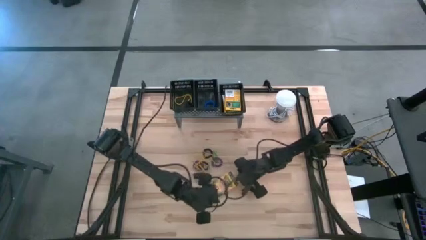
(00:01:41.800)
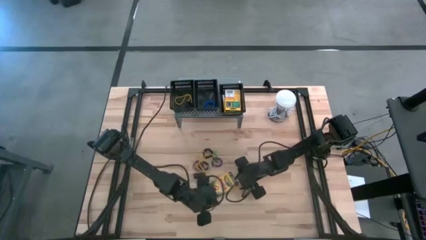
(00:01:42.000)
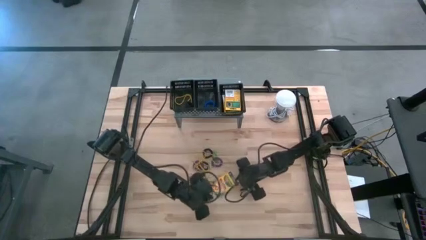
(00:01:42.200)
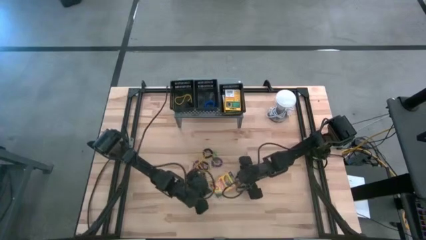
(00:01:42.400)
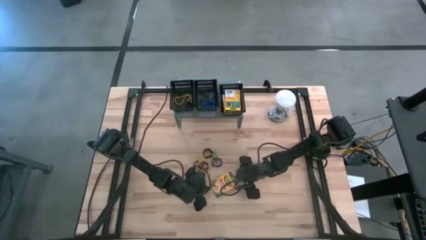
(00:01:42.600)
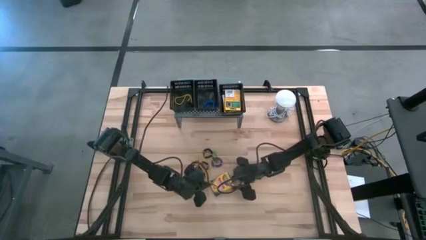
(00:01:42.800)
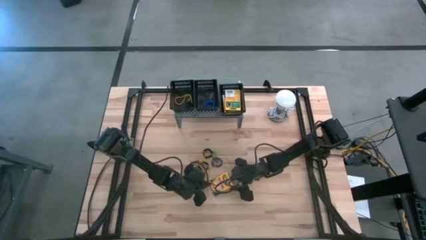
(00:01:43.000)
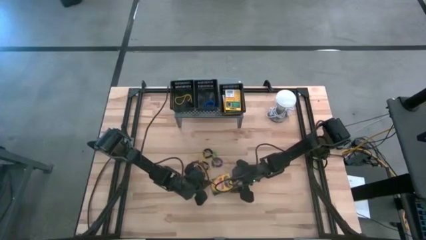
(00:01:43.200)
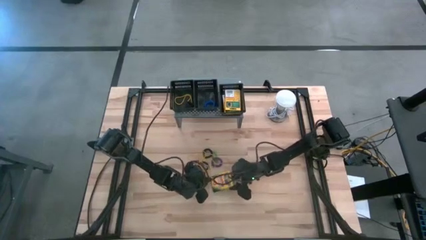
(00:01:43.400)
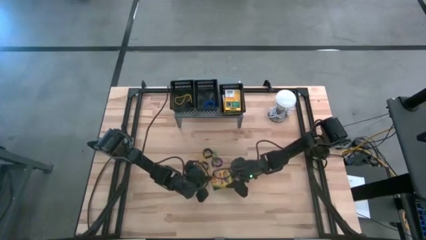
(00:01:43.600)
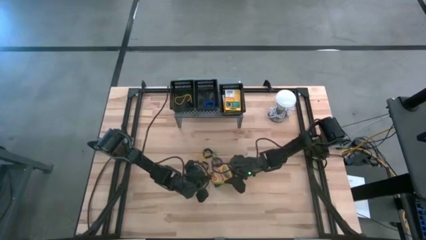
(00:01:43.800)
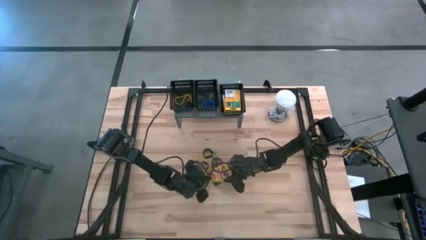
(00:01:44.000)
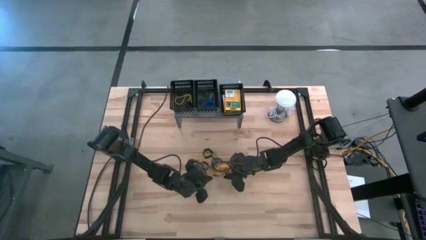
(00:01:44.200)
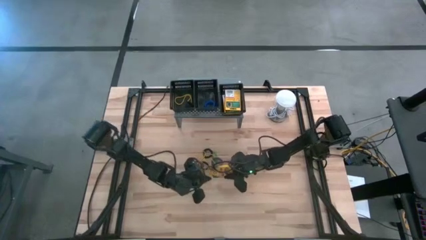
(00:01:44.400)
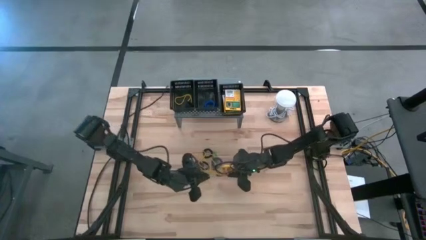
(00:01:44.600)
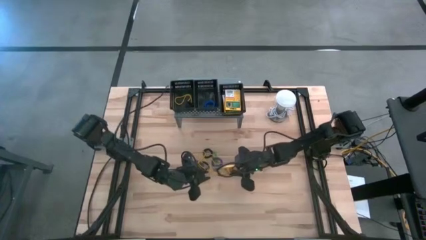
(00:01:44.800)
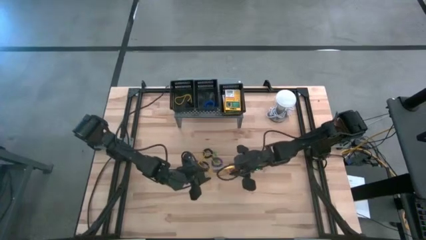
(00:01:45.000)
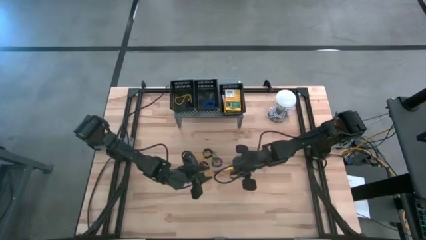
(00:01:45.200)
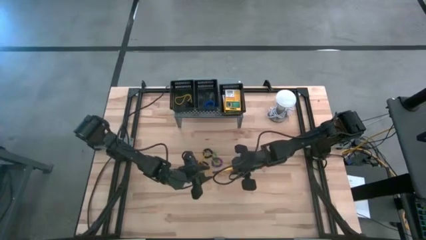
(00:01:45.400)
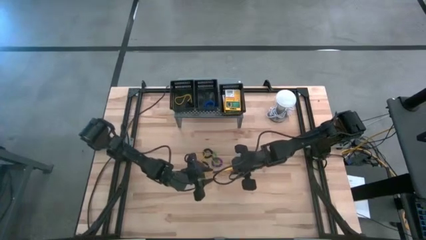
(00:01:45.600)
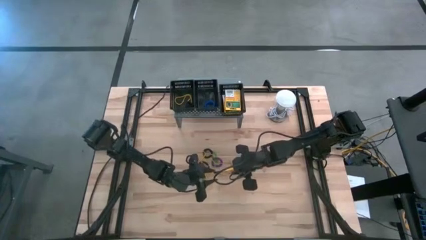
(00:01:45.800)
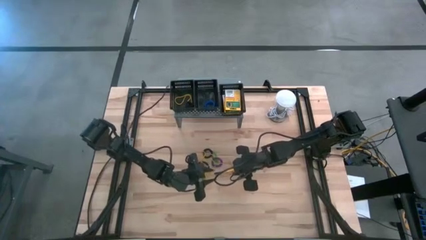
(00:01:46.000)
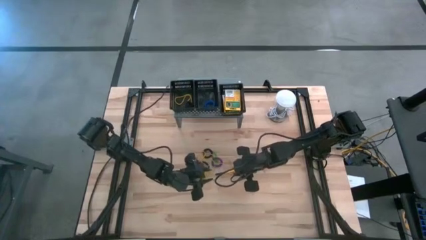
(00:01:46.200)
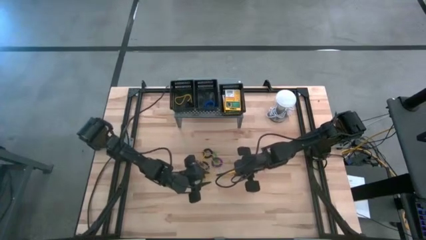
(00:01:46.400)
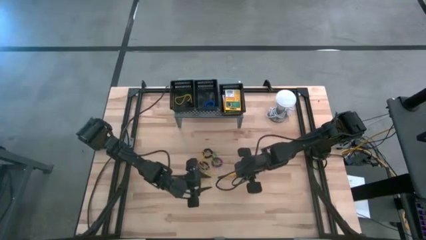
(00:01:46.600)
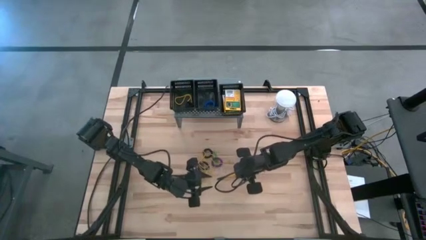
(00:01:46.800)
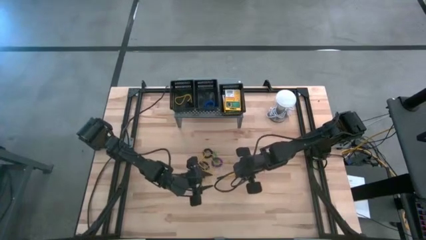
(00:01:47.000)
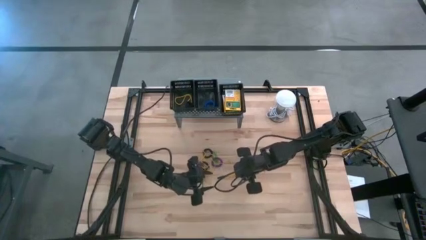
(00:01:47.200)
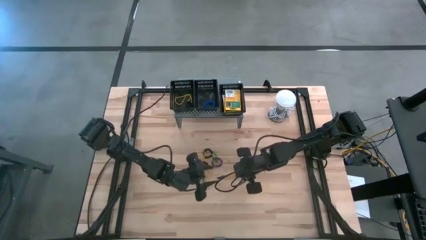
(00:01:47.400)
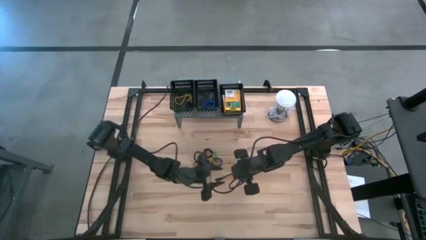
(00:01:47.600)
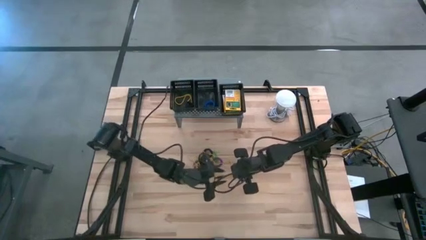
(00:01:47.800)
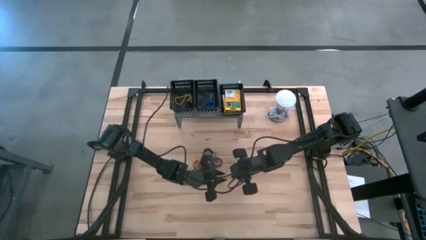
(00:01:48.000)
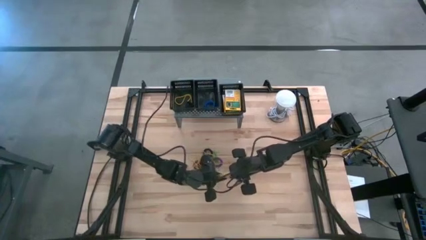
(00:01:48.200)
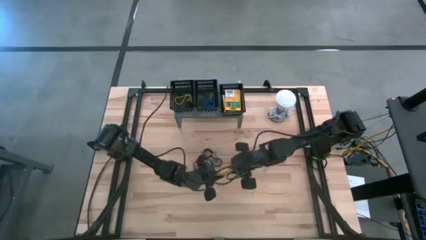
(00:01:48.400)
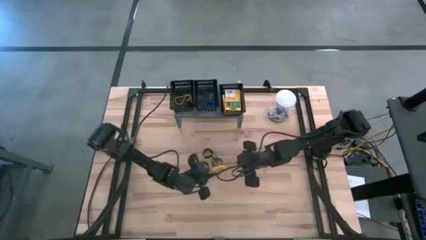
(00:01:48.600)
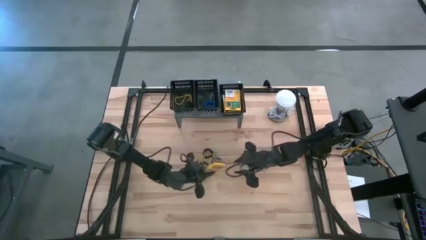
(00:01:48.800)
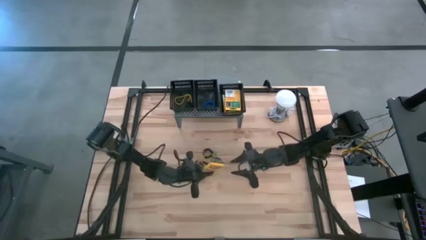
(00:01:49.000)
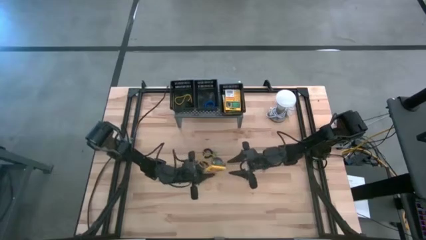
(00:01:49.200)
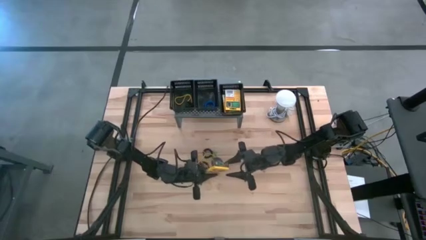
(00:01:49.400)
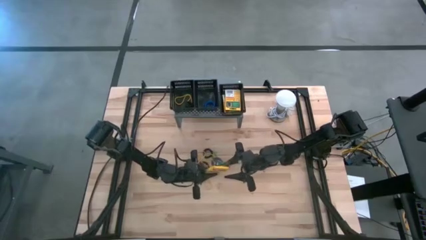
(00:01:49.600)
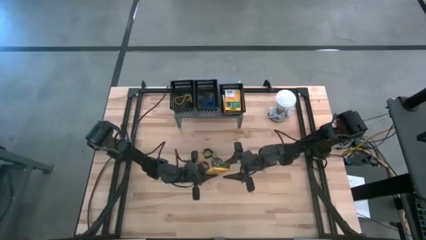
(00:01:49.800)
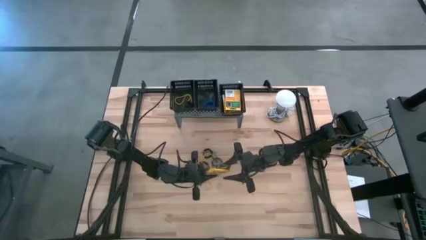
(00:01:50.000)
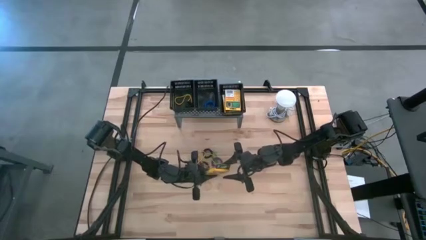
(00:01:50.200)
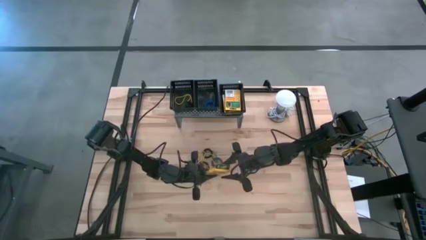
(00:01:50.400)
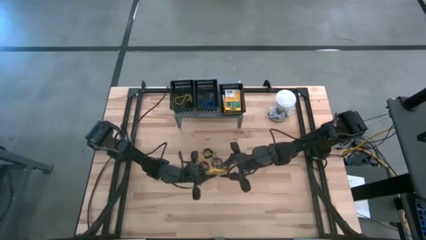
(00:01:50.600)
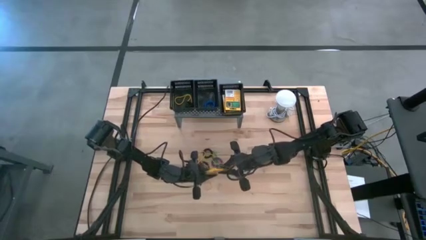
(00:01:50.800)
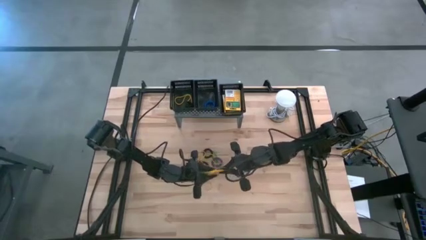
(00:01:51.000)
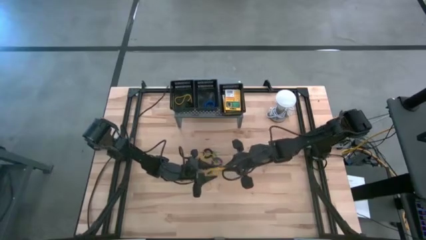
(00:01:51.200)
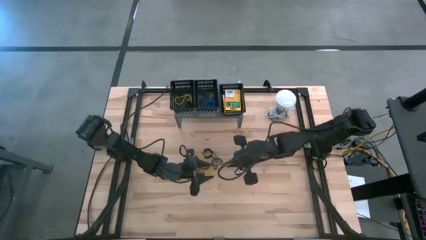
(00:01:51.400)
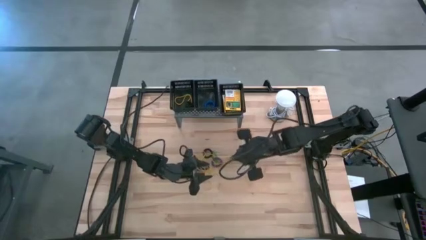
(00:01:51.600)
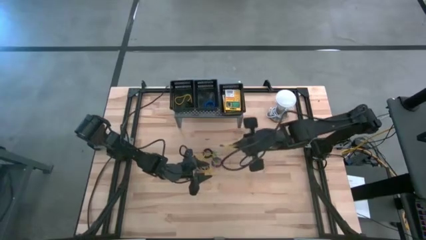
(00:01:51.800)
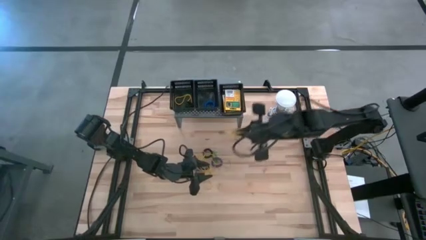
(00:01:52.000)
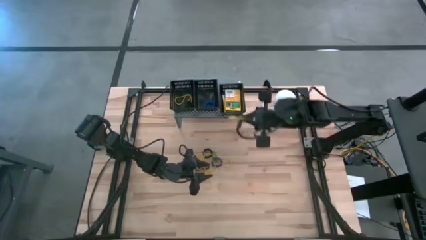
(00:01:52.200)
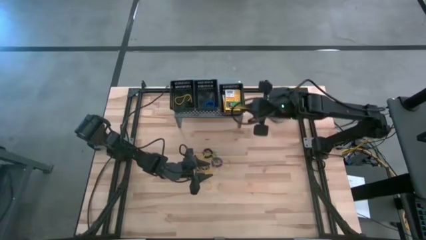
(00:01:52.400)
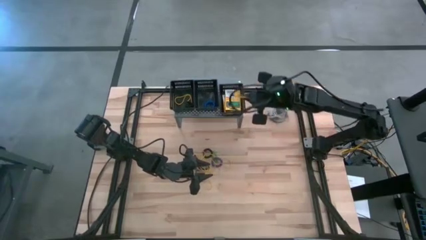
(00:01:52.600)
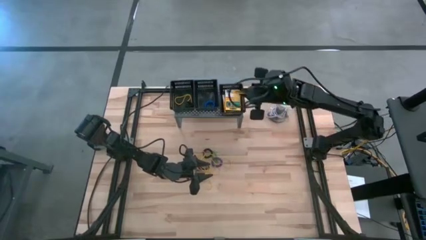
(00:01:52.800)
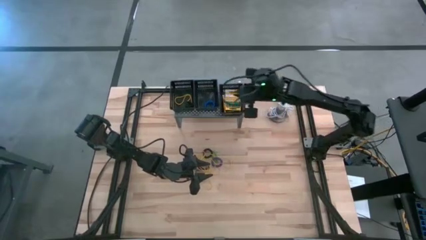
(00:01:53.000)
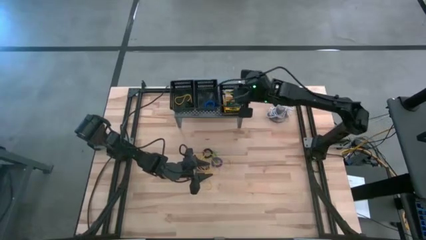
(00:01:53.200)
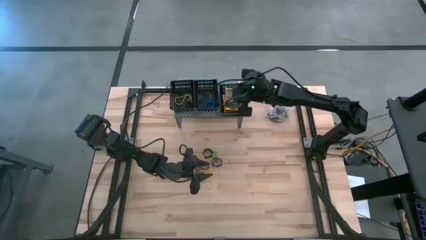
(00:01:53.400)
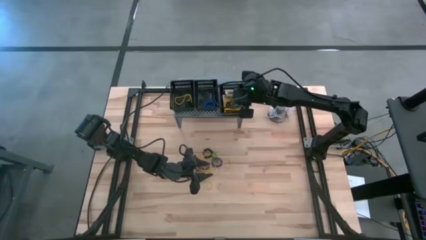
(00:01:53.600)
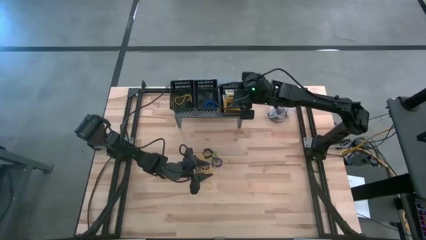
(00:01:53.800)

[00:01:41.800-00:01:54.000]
Task: Pick & Place Office Desk Supplies
Put the crayon box into the right black bin on the shelf

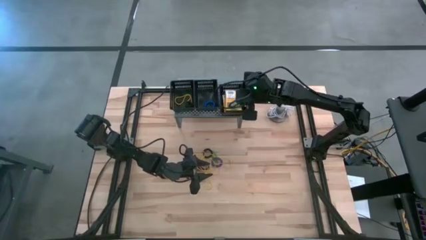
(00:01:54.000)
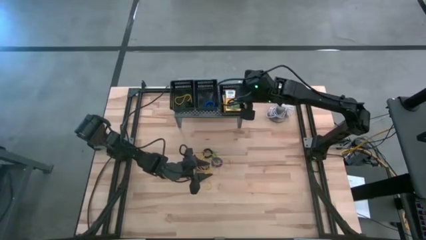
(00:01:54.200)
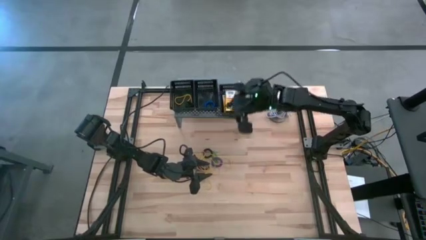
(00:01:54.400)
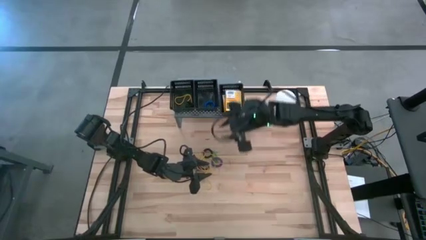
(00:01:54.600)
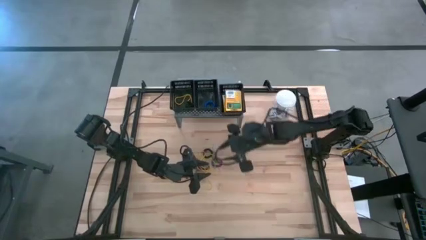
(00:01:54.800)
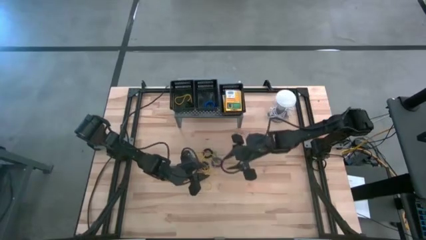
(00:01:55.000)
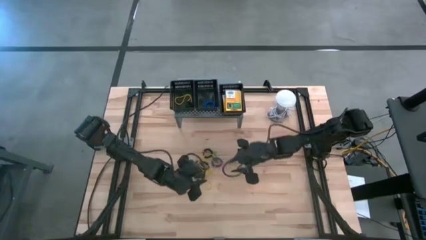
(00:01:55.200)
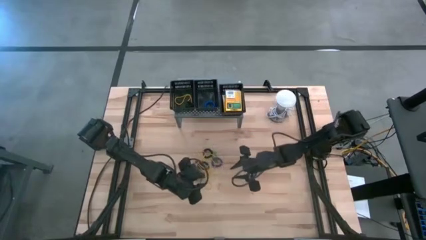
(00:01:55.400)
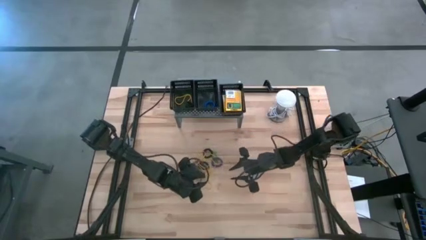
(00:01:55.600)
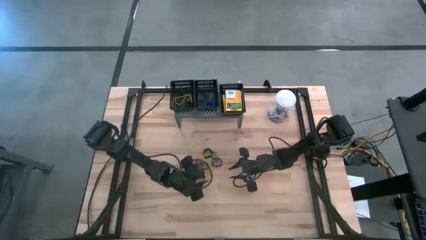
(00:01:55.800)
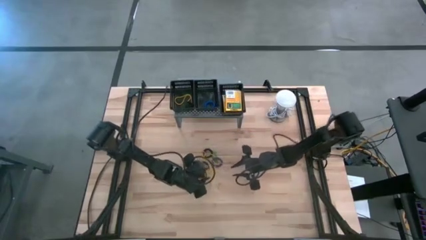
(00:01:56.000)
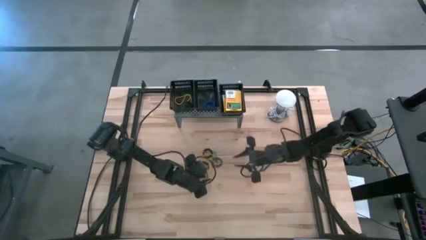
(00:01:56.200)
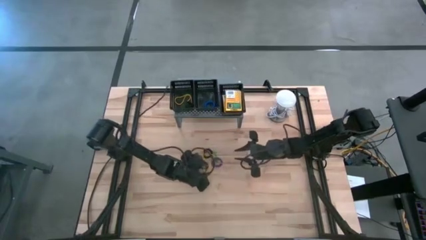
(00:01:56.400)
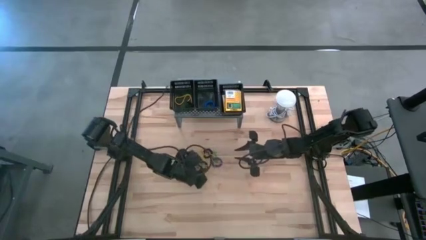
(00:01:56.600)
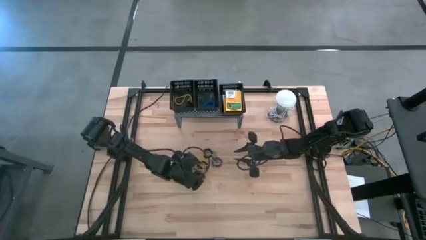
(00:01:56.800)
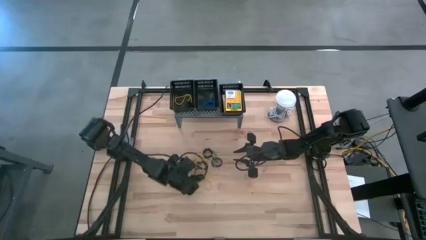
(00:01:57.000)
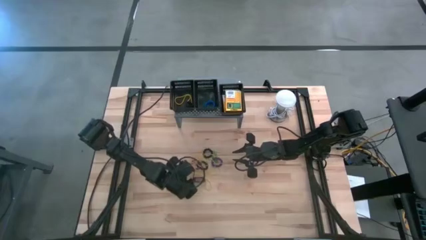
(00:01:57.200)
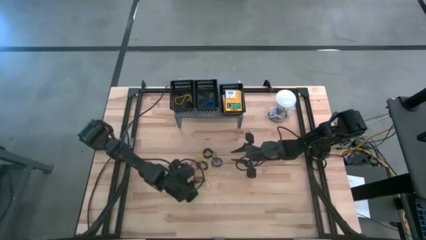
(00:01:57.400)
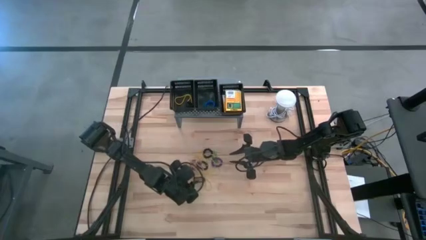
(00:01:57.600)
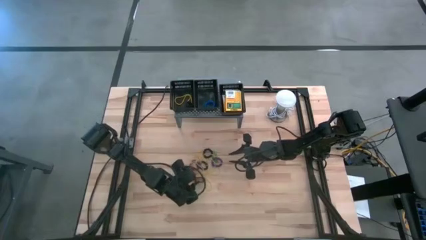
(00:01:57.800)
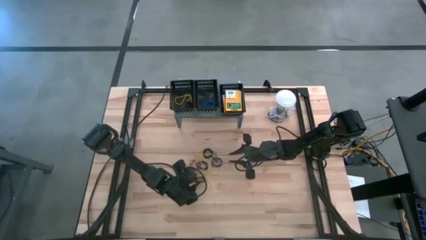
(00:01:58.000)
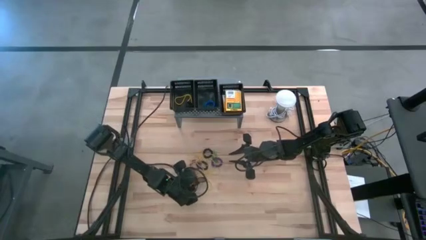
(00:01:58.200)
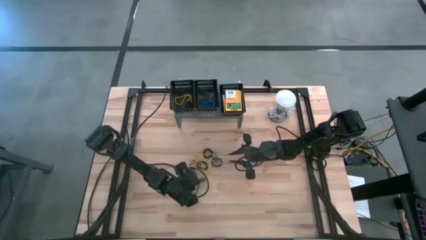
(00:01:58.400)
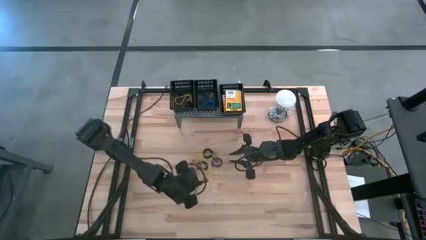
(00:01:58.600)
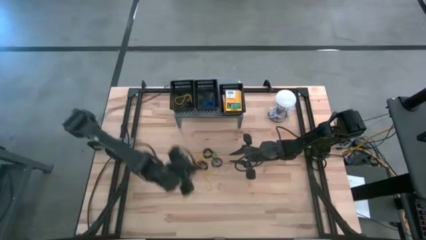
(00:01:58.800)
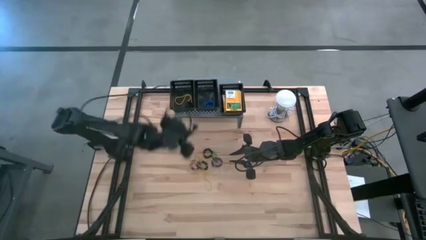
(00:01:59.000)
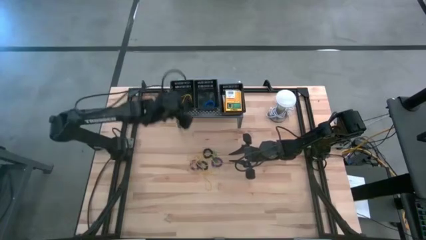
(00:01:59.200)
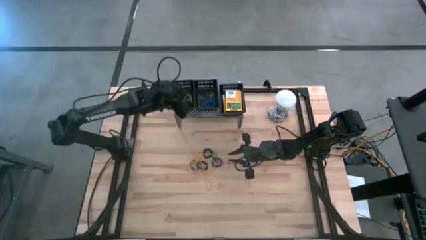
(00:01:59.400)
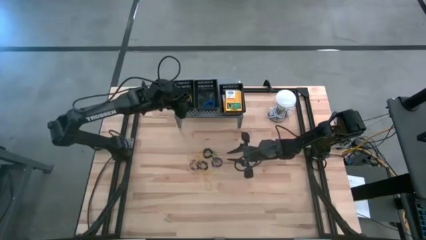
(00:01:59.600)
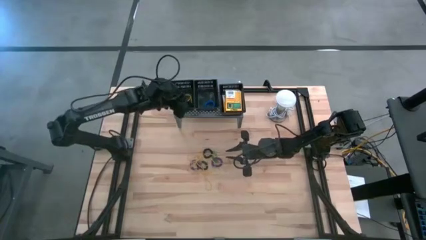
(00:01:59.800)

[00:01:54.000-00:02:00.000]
Put the black rubberband into the left black bin on the shelf
